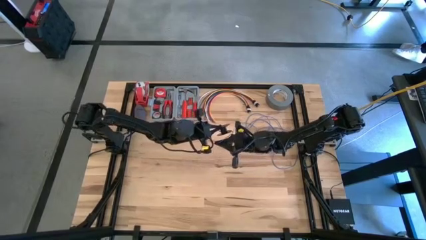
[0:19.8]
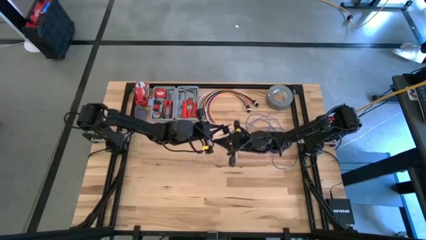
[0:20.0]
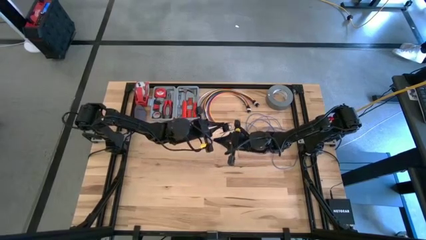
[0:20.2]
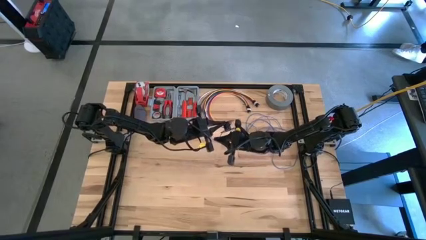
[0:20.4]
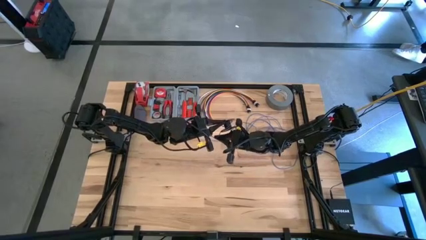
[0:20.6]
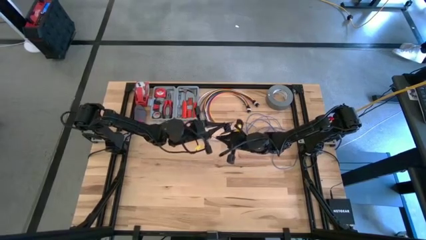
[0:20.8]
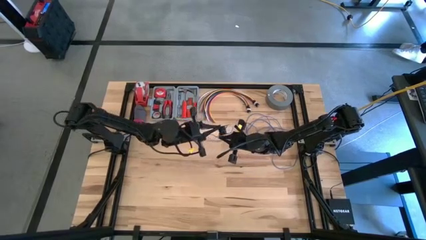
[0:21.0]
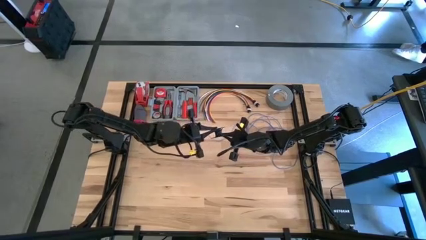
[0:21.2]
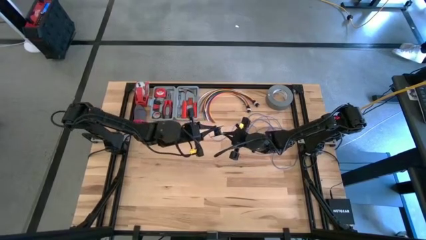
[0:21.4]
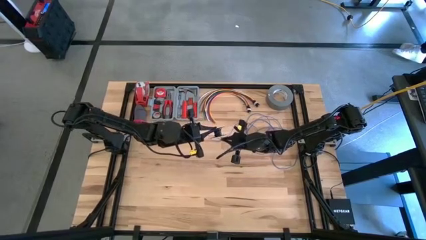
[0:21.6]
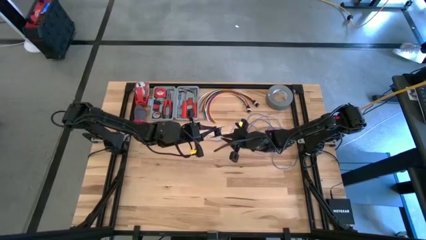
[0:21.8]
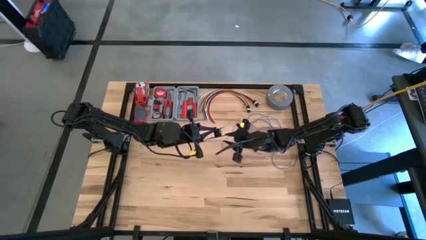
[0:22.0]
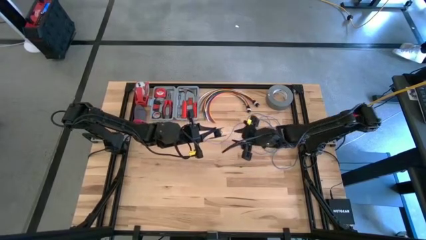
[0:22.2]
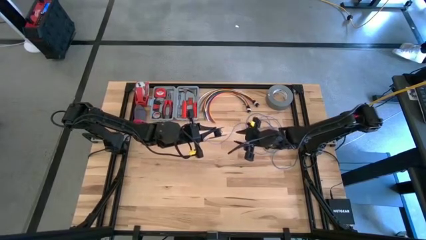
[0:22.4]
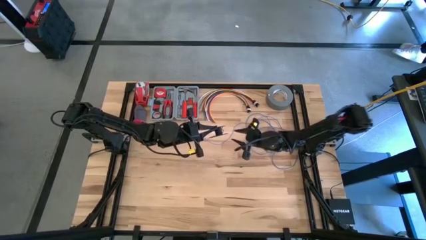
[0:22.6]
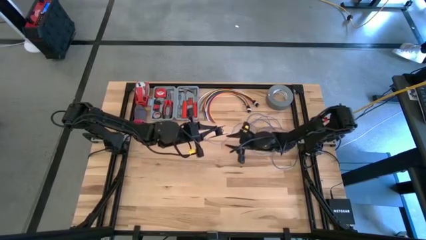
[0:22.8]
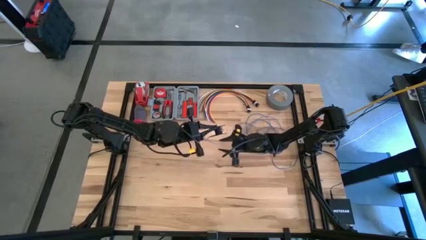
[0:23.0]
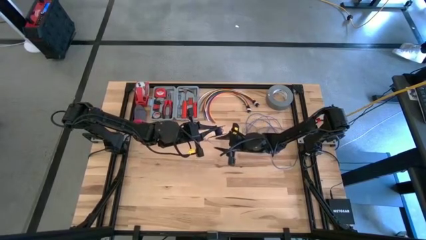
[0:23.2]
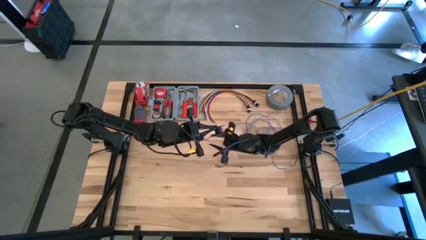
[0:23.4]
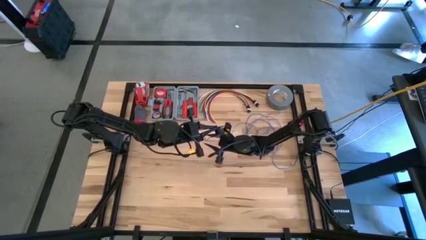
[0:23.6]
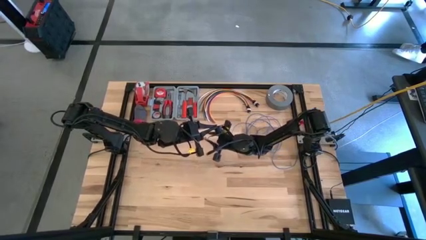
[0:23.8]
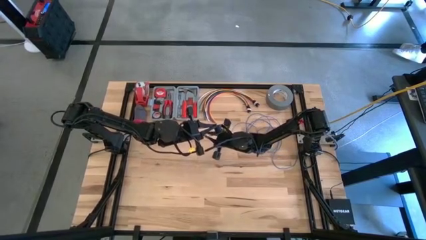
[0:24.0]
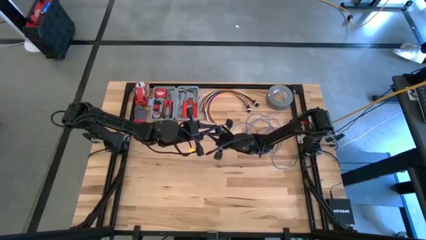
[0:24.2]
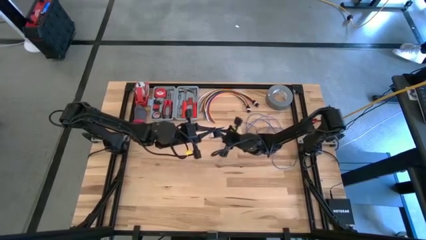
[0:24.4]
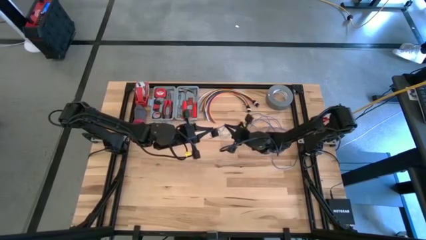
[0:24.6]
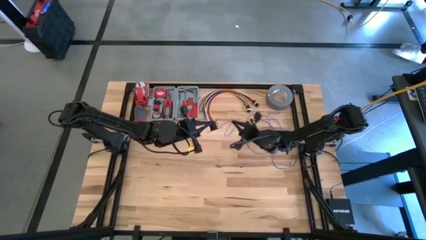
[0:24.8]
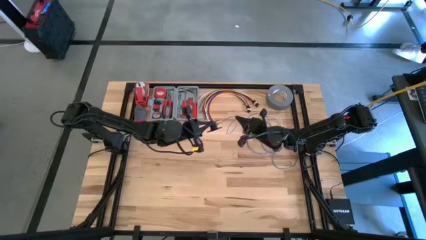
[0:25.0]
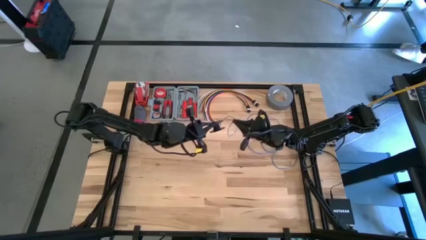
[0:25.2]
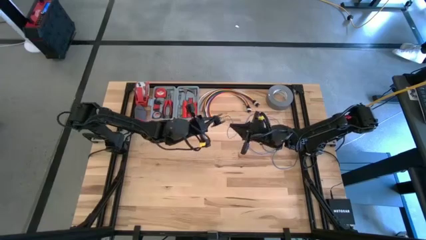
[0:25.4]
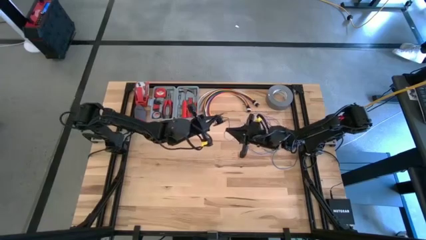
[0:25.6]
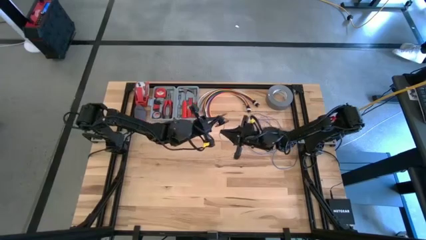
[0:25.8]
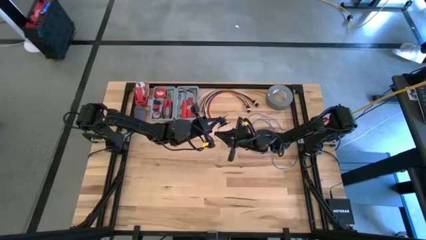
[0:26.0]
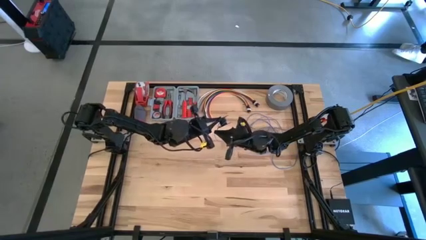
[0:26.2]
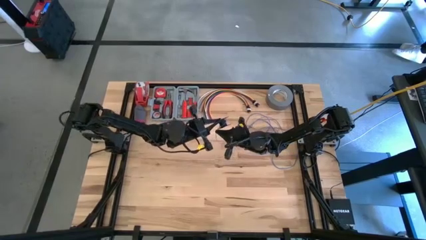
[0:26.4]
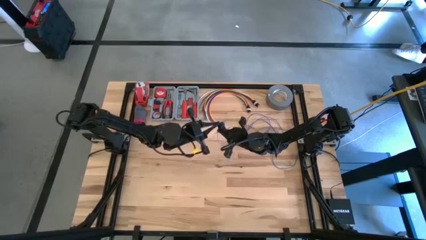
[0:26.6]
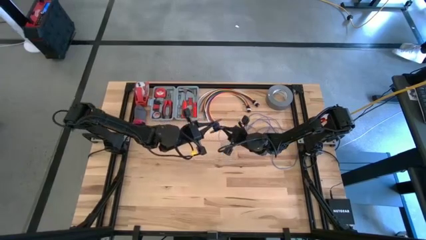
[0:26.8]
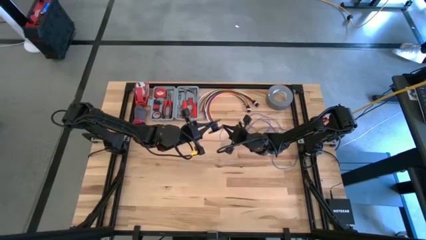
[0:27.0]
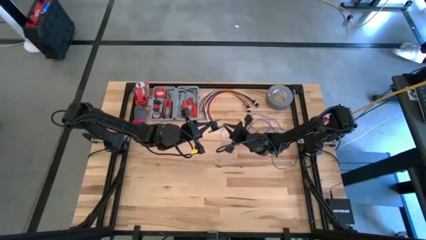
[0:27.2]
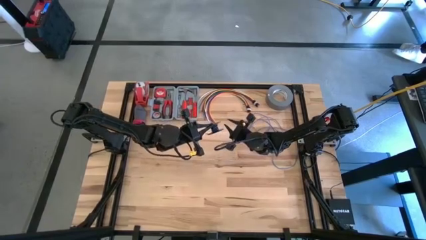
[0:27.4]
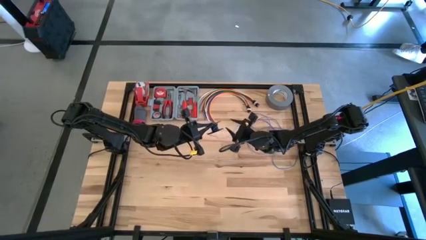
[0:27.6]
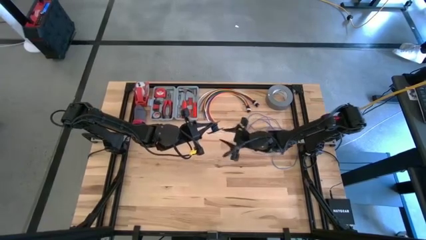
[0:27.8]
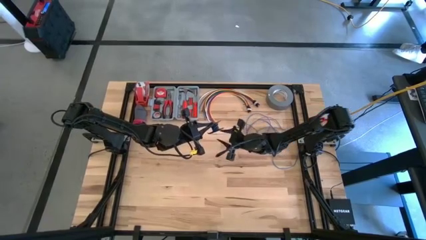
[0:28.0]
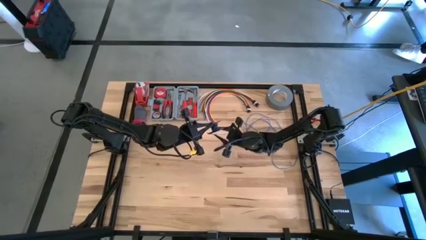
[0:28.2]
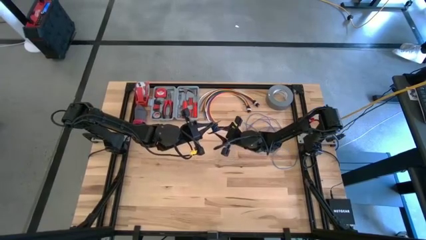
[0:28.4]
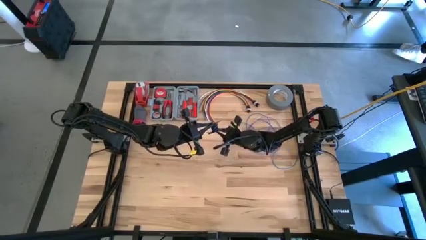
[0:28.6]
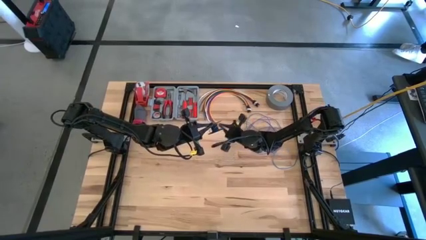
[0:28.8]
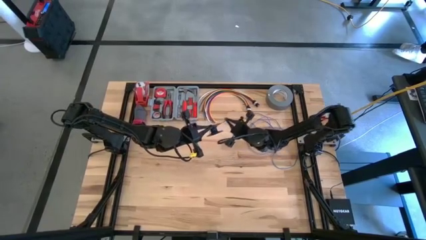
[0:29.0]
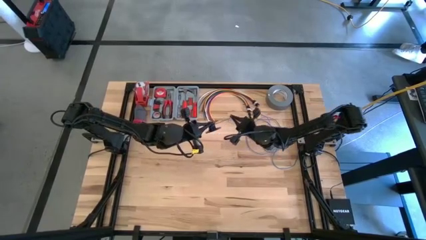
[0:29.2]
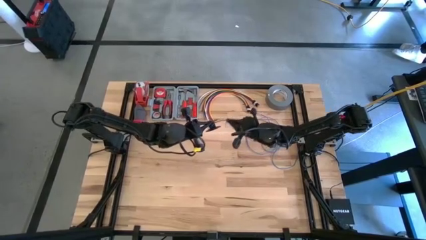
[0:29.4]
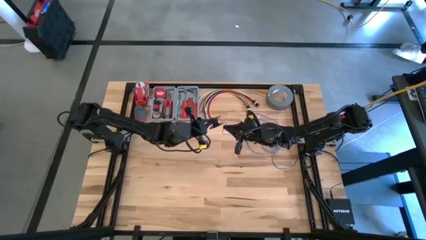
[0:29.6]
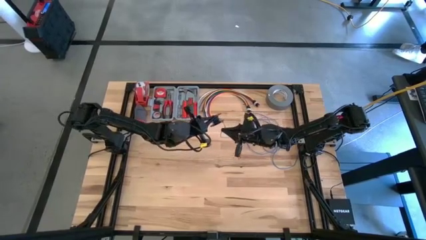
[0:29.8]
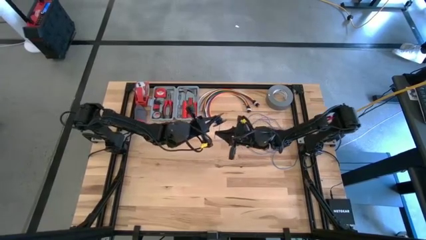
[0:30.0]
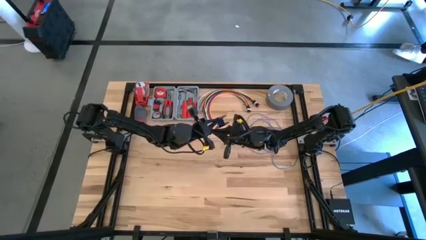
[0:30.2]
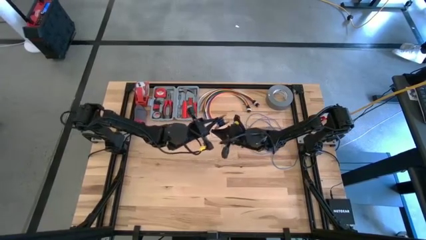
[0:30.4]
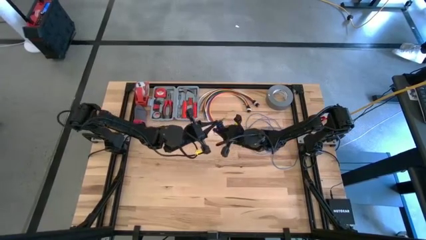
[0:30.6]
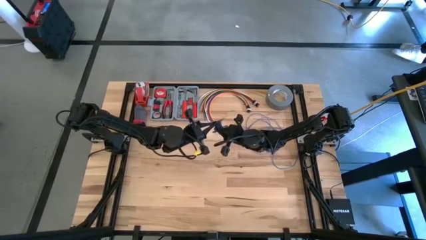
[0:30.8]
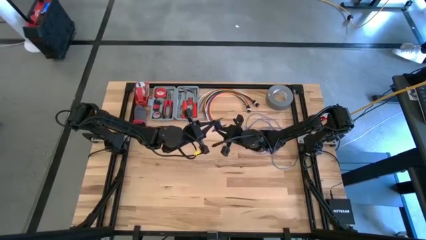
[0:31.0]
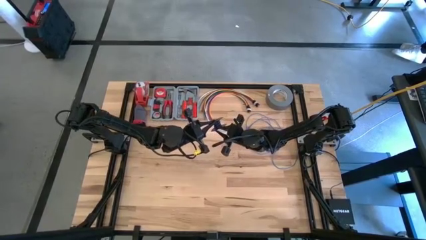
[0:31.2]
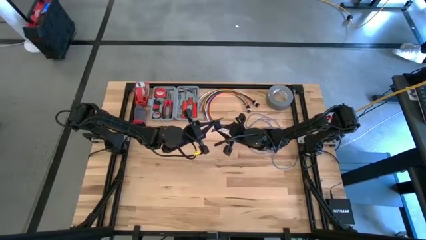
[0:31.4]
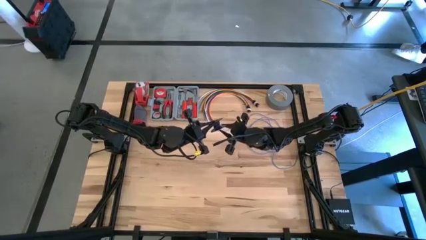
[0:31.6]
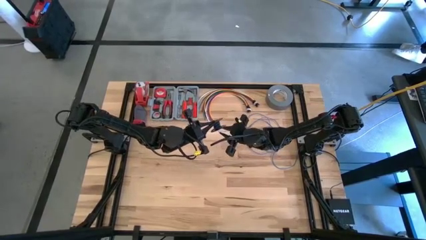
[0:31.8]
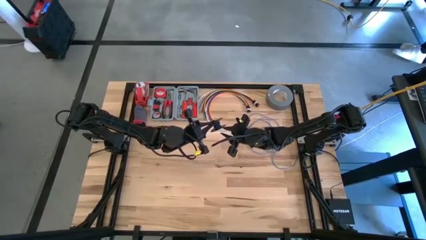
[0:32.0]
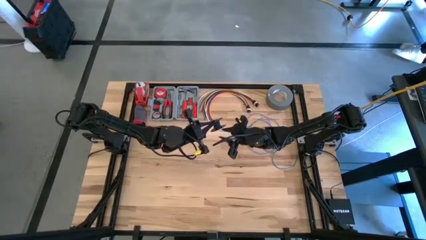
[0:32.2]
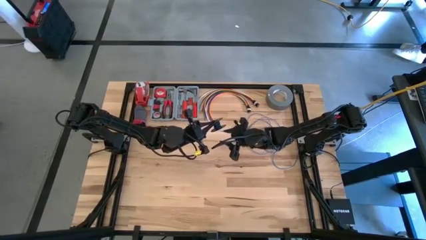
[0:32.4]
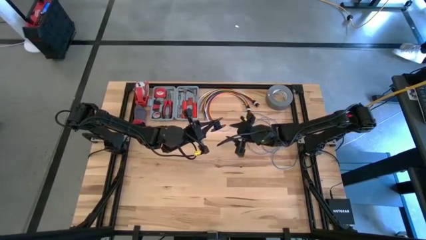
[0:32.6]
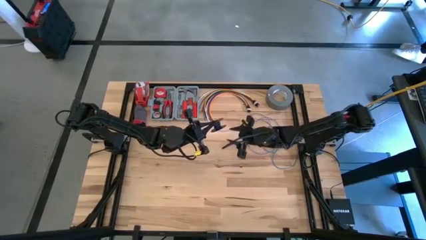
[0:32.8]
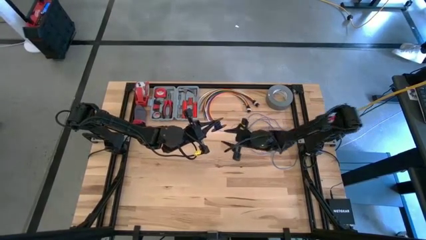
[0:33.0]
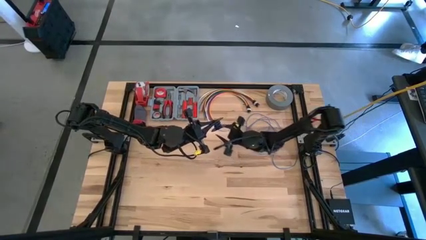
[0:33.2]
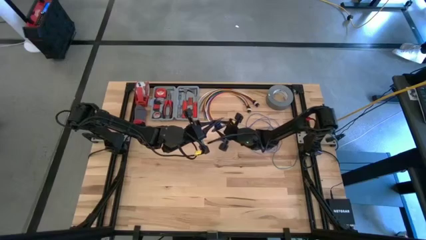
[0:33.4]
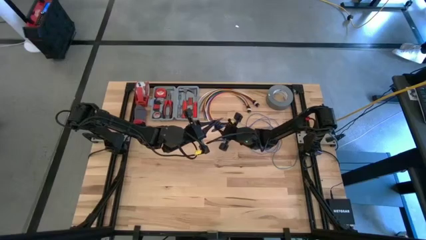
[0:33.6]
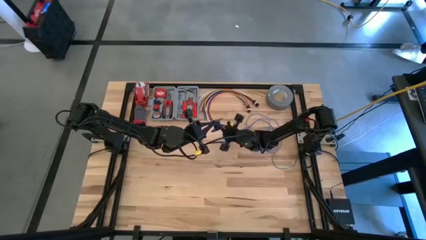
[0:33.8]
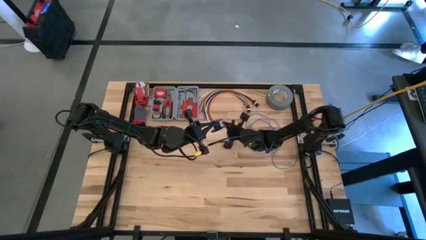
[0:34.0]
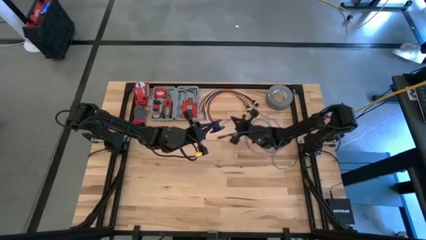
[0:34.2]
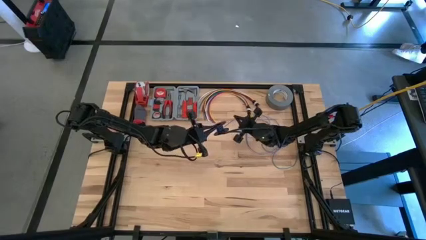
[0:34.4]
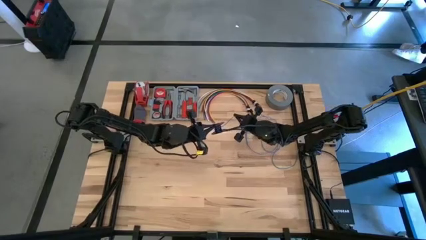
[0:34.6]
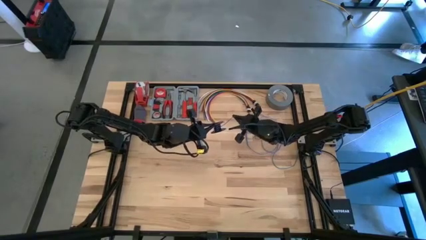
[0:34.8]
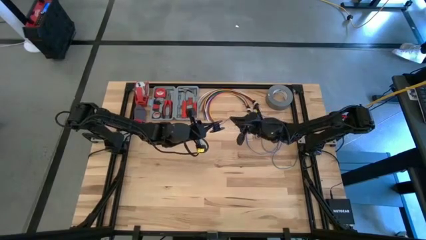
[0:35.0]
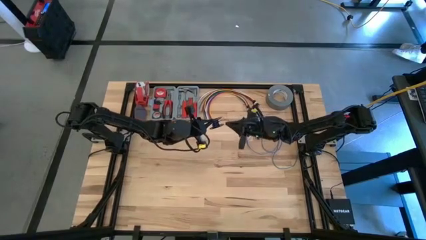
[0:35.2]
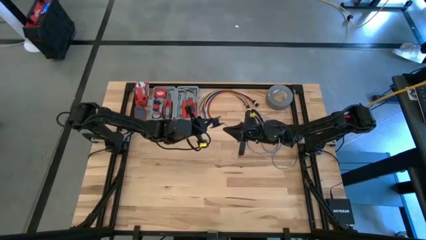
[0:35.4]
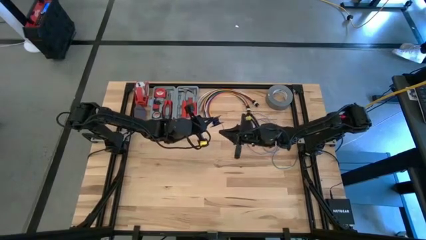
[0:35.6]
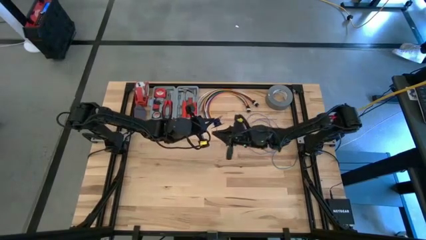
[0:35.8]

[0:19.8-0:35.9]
Task: Coil cords
Coil the blue wire onto the black spool
